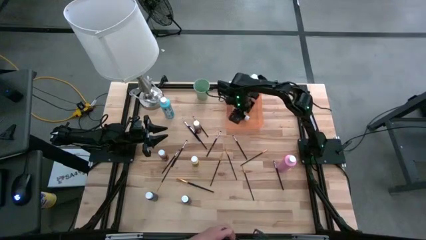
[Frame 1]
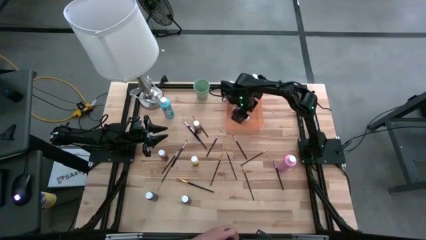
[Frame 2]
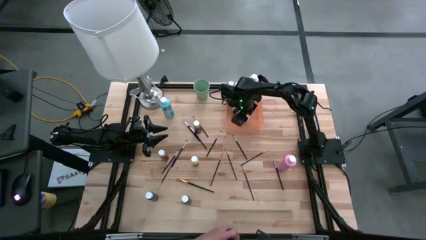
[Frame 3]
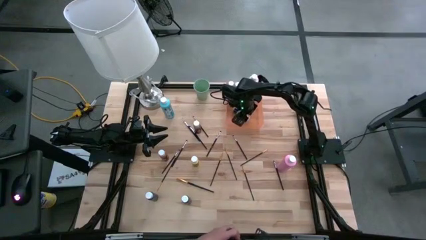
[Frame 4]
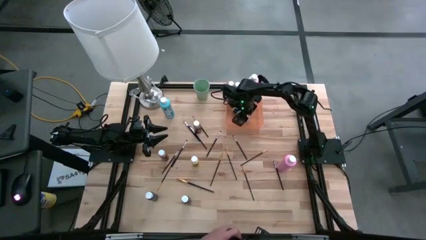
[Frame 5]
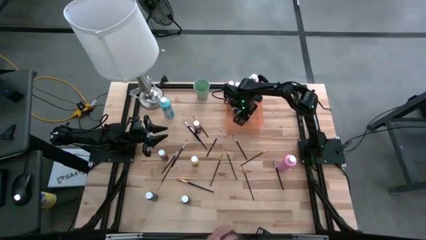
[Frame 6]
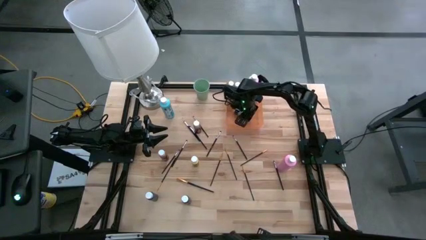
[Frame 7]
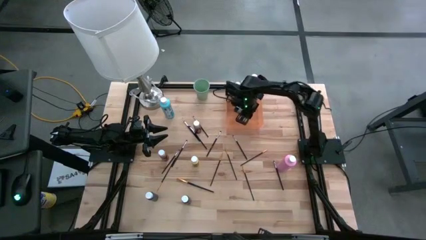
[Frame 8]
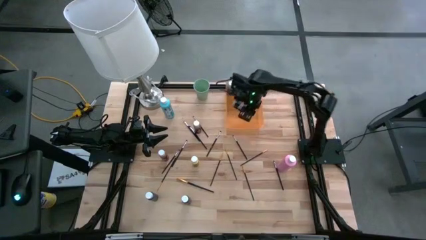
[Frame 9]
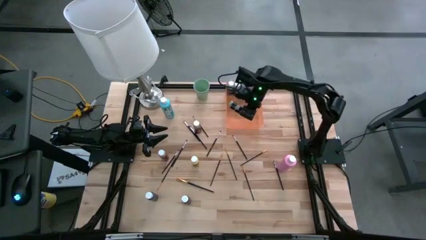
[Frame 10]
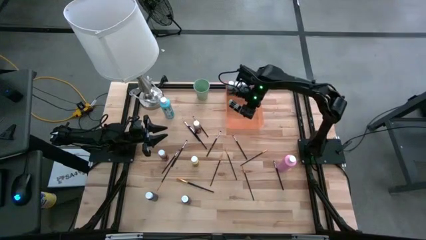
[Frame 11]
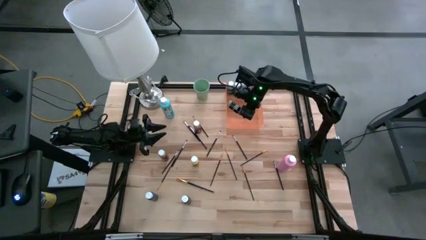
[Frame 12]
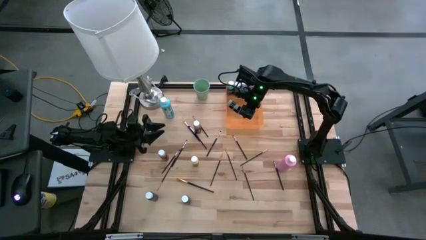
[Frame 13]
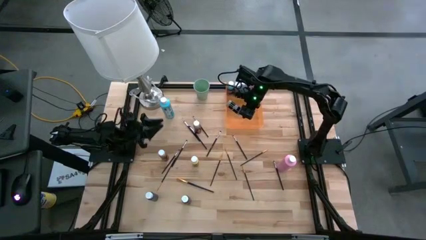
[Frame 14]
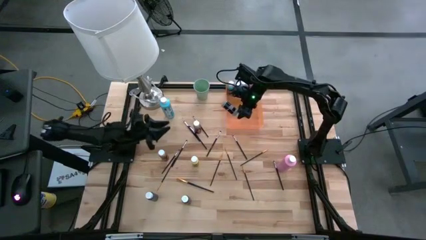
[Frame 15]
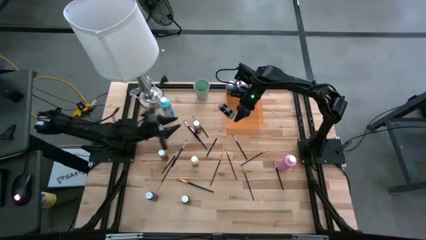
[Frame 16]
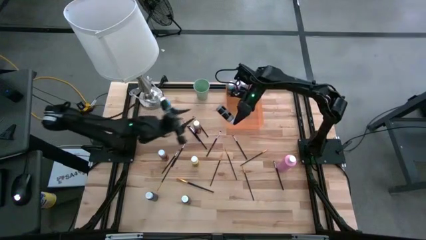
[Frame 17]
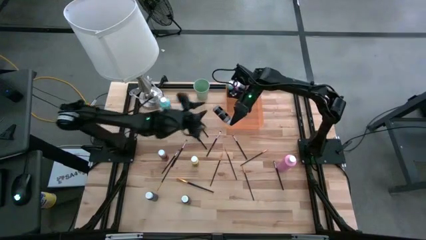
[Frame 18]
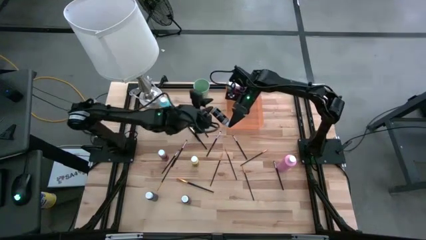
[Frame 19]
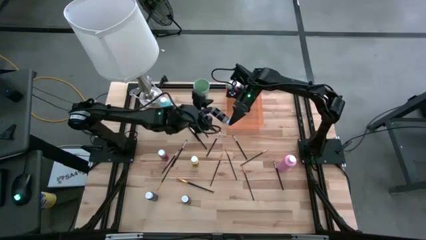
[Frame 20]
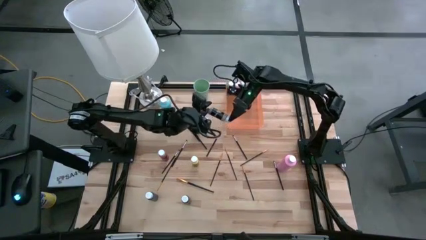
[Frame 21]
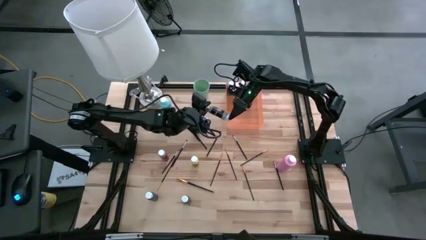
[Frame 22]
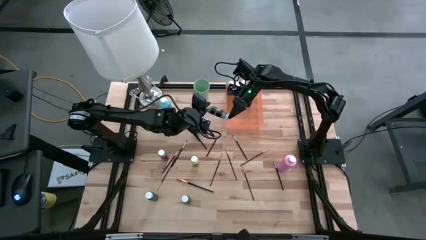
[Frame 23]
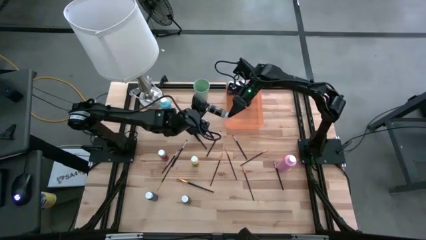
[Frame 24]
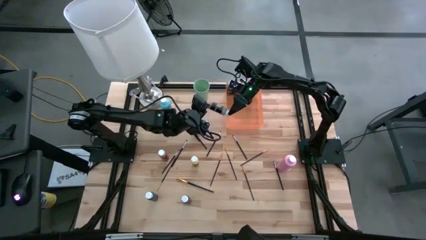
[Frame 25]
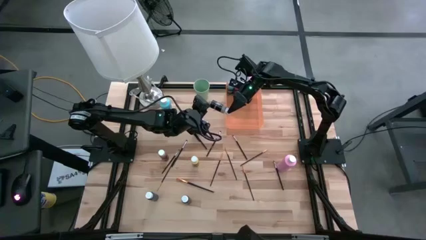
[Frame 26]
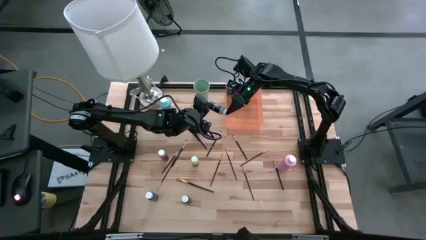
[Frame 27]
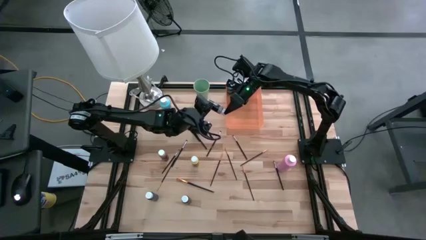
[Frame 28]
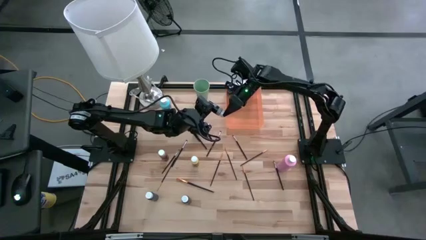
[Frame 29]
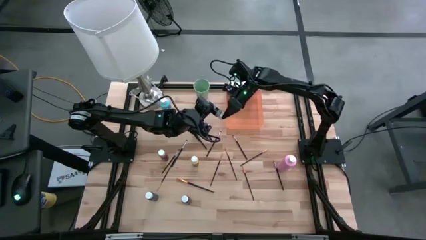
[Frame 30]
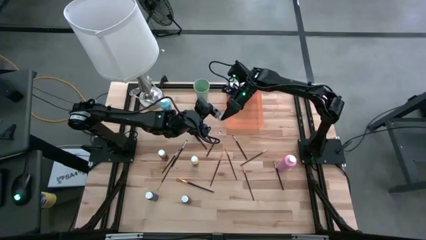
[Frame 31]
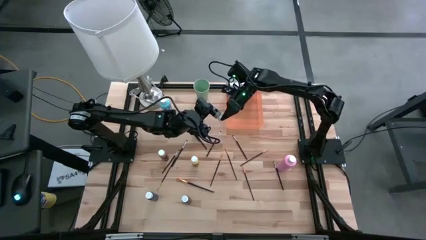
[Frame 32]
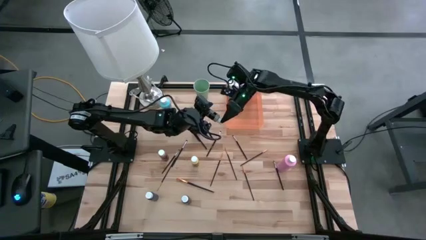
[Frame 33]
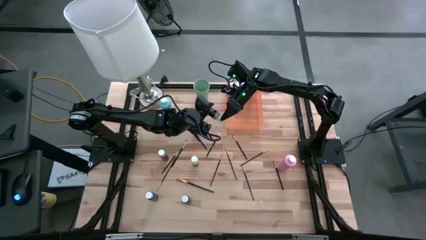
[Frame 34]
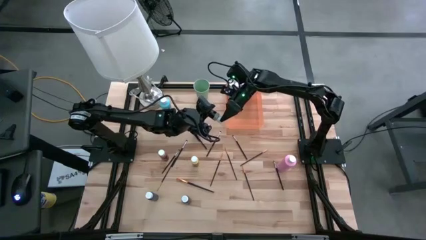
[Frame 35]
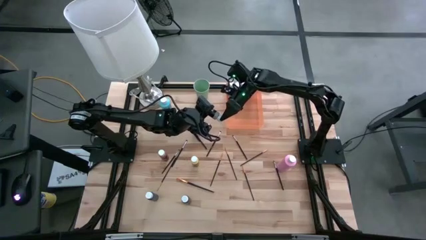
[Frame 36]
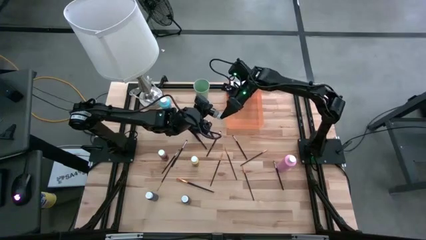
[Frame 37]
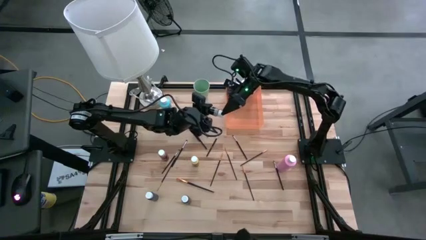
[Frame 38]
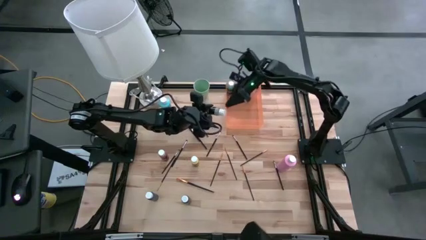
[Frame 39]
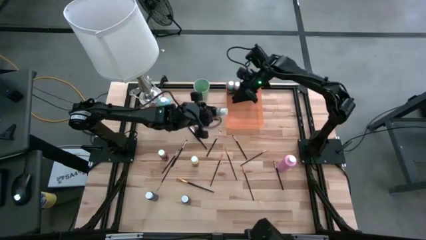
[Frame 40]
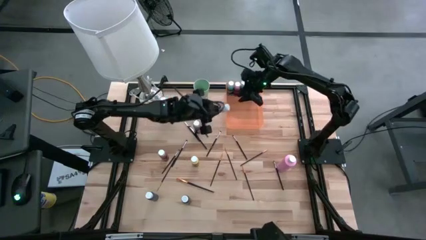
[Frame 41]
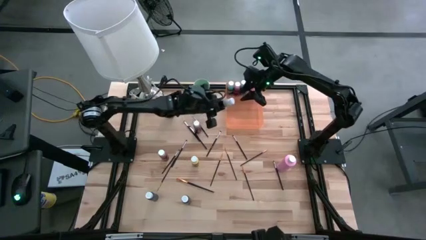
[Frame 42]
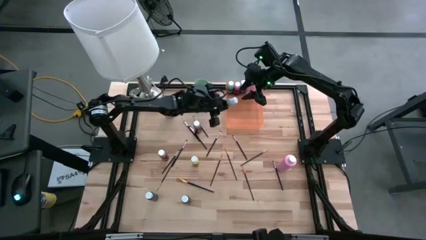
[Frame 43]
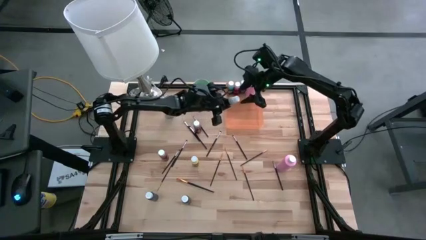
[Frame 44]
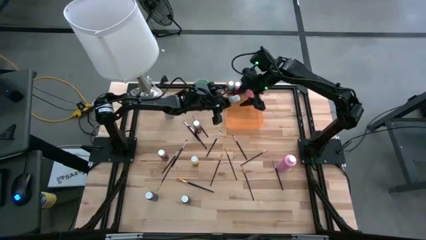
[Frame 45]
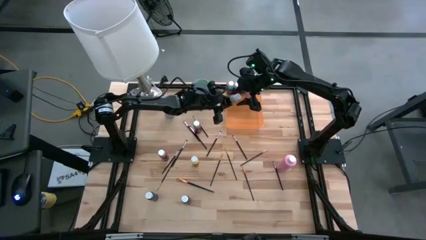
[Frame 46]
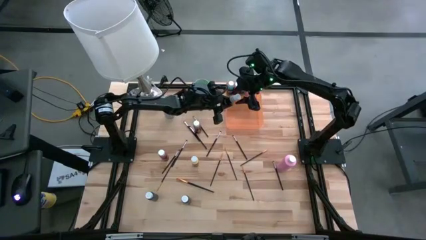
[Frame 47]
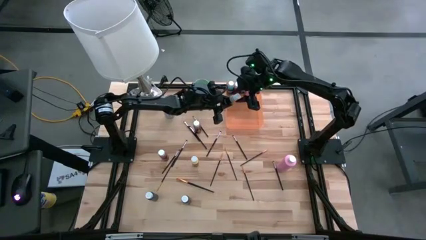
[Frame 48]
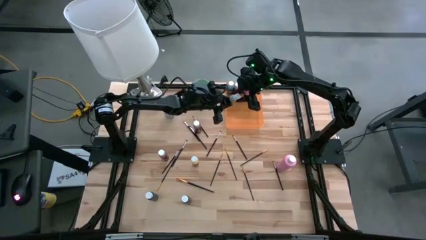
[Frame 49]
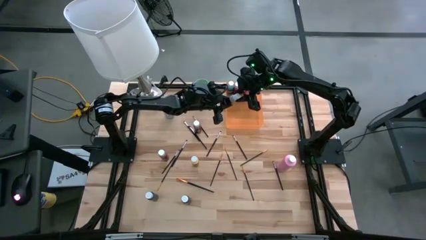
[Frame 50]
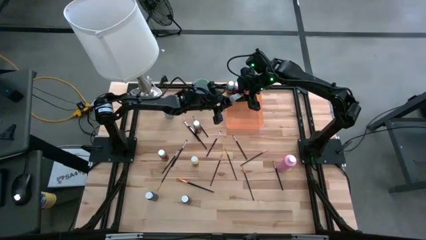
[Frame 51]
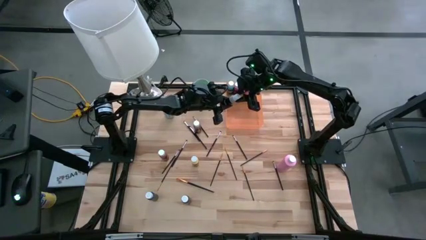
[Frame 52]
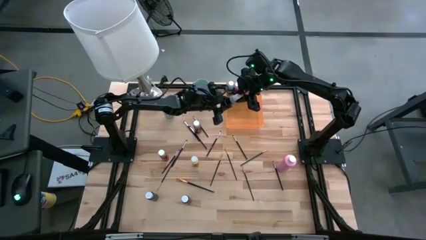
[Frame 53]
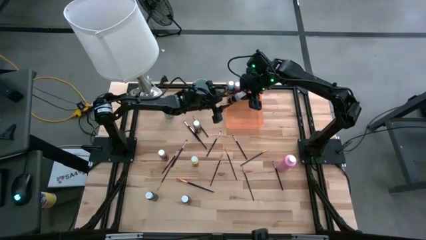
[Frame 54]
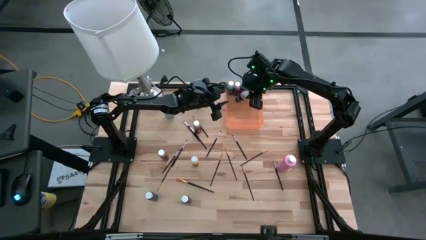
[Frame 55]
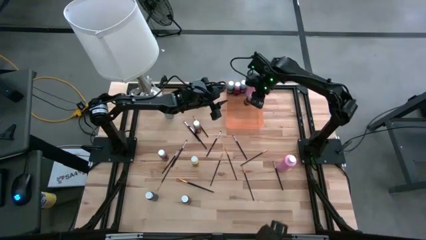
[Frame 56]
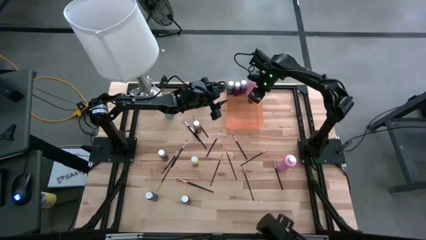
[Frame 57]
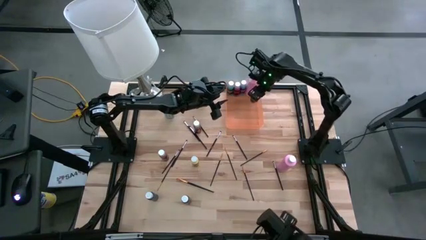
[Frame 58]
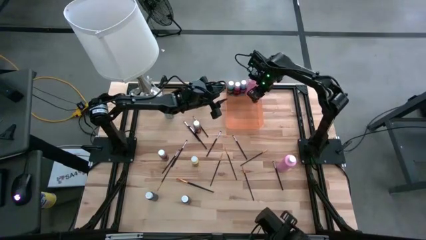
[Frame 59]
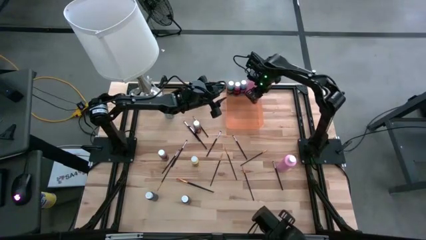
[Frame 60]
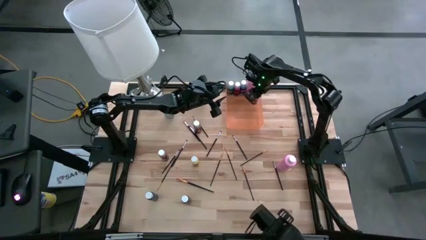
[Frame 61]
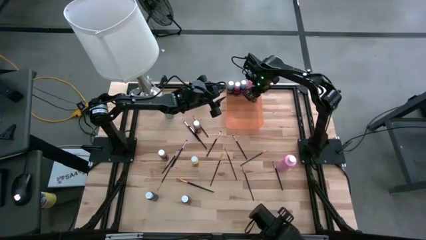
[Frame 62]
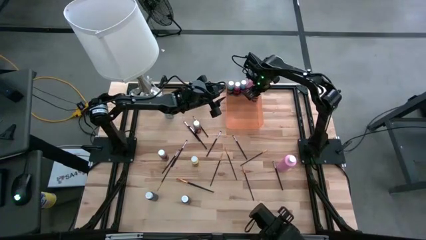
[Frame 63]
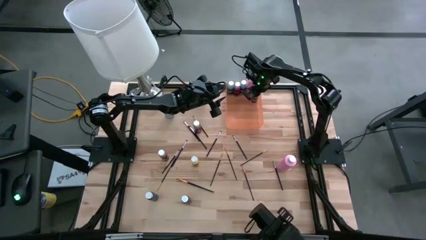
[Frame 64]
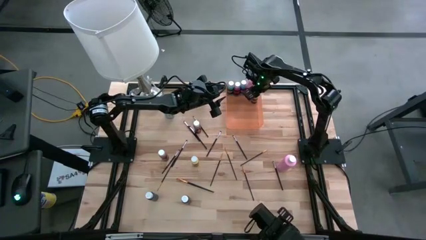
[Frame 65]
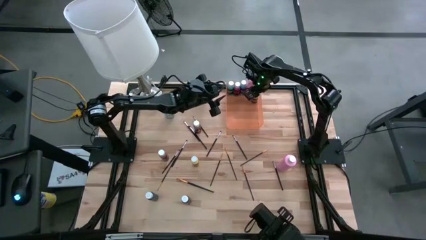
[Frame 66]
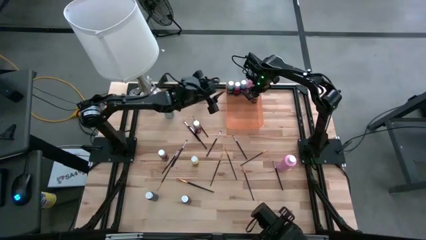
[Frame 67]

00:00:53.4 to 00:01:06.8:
Task: Pick & Place Paint Supplies
Put the gray paint bottle into the orange bin
